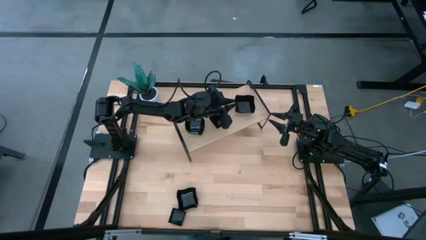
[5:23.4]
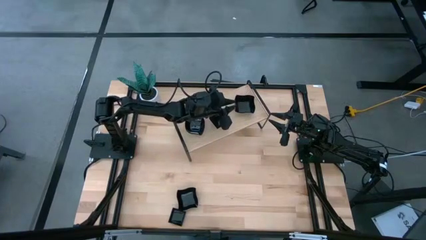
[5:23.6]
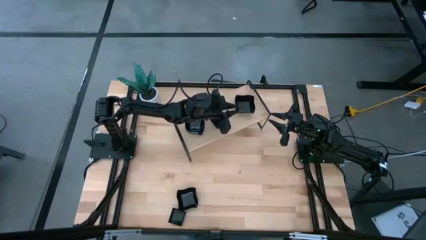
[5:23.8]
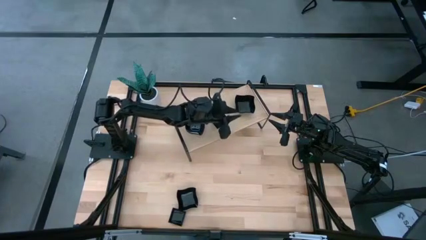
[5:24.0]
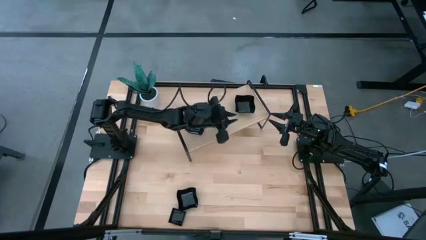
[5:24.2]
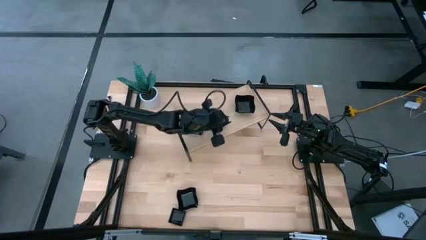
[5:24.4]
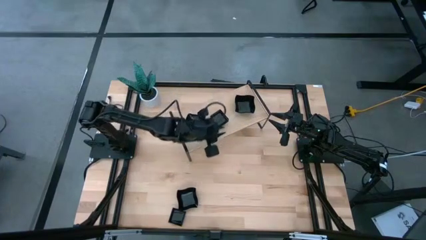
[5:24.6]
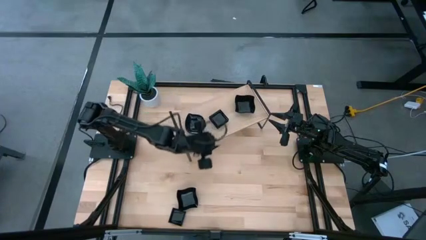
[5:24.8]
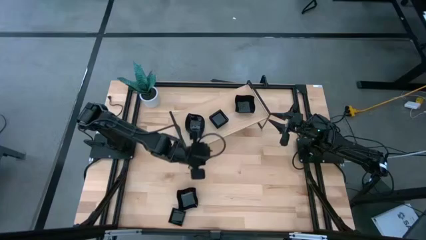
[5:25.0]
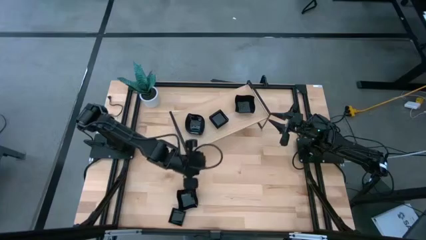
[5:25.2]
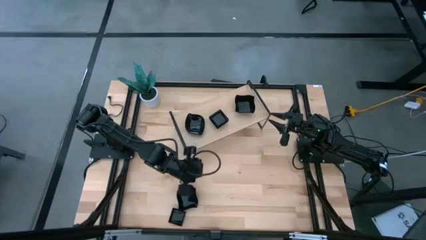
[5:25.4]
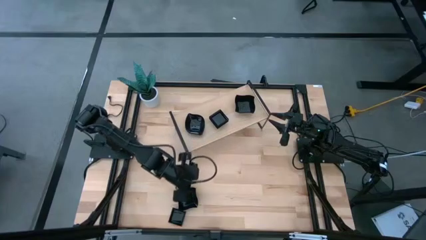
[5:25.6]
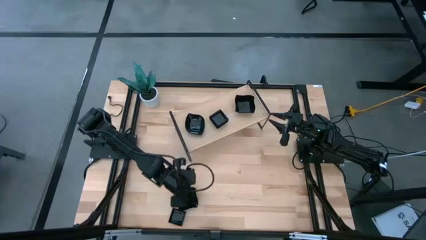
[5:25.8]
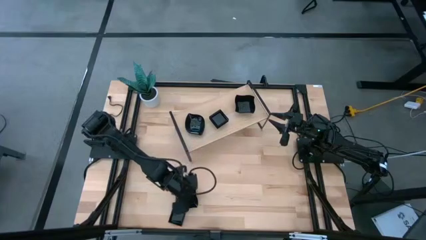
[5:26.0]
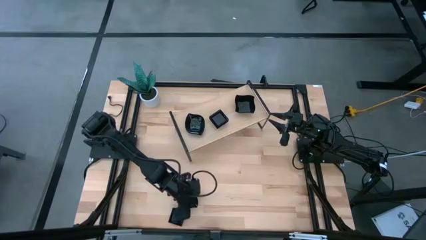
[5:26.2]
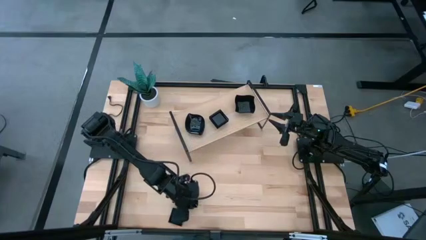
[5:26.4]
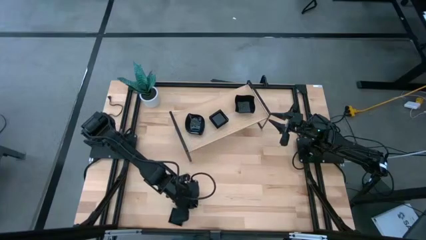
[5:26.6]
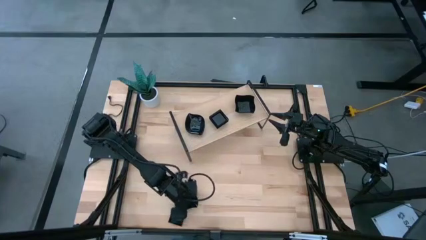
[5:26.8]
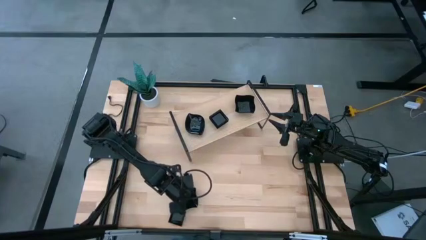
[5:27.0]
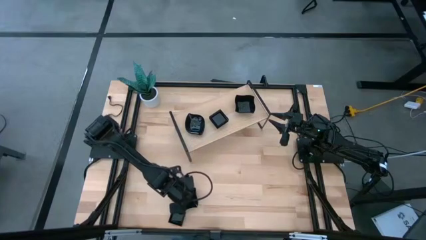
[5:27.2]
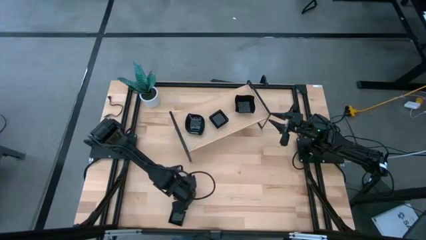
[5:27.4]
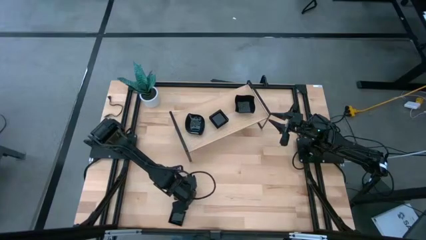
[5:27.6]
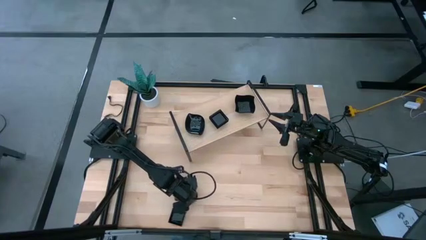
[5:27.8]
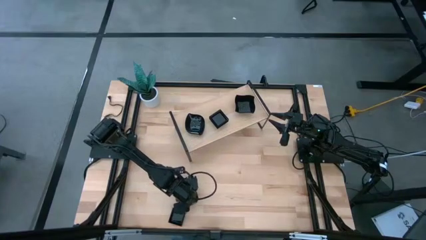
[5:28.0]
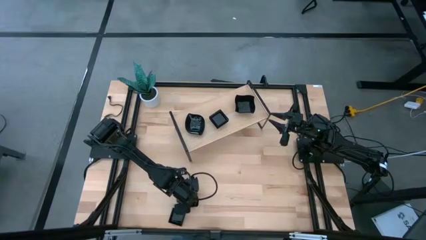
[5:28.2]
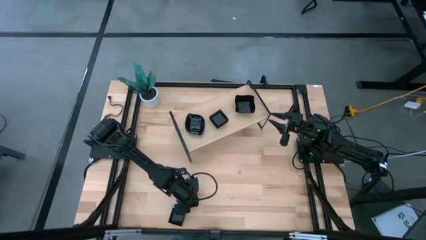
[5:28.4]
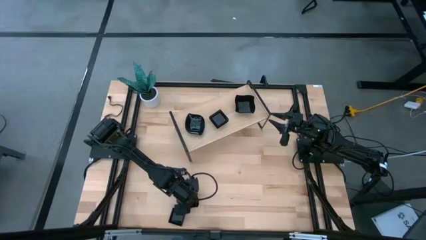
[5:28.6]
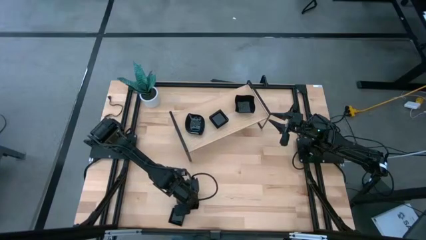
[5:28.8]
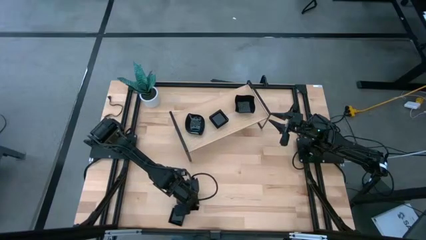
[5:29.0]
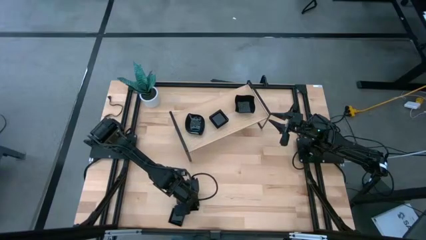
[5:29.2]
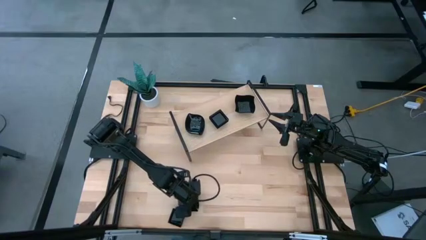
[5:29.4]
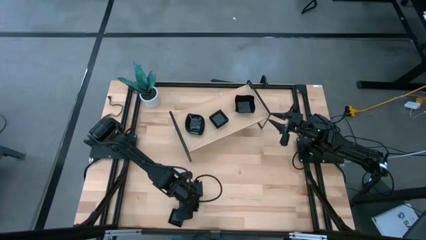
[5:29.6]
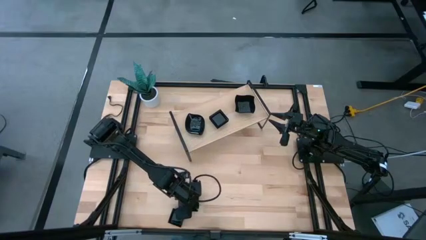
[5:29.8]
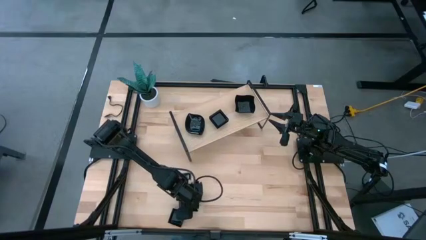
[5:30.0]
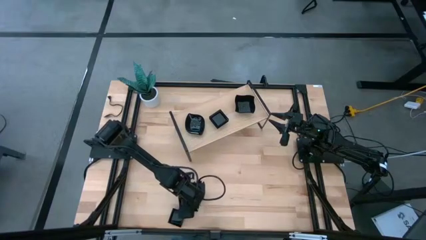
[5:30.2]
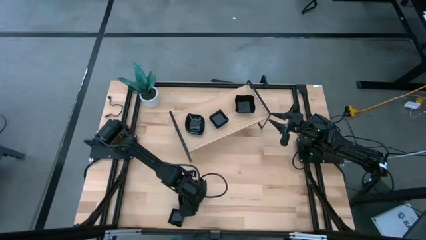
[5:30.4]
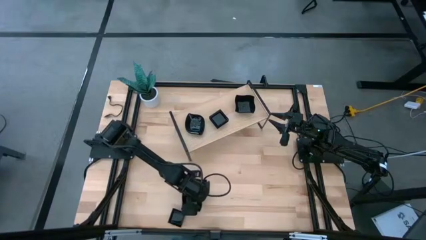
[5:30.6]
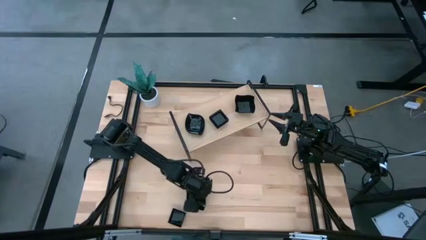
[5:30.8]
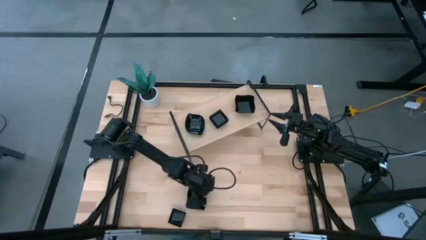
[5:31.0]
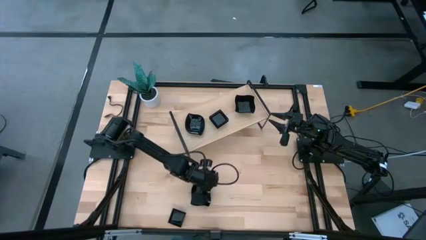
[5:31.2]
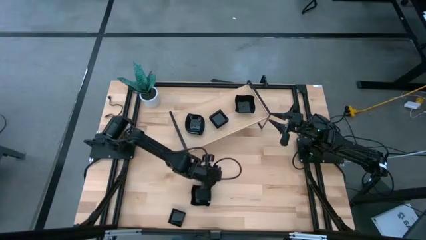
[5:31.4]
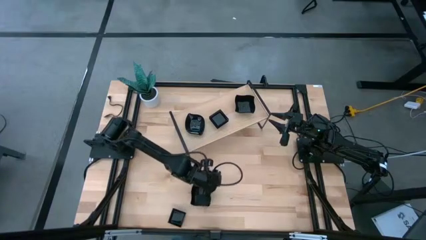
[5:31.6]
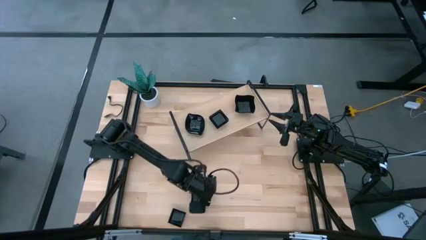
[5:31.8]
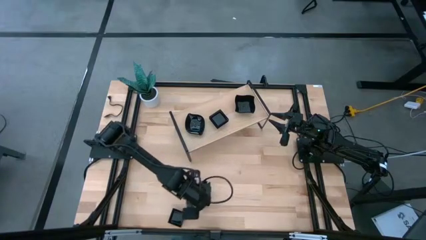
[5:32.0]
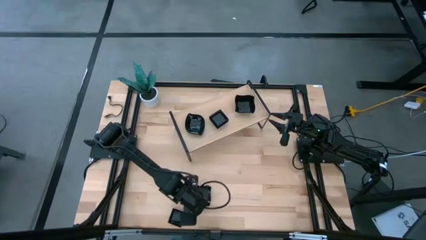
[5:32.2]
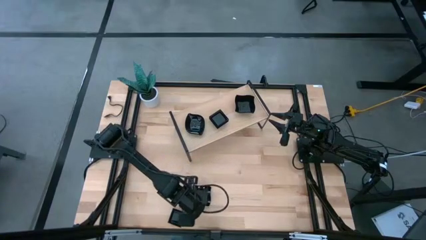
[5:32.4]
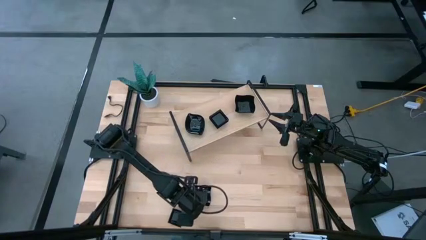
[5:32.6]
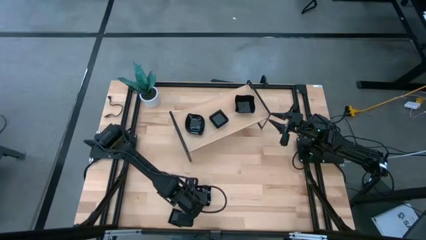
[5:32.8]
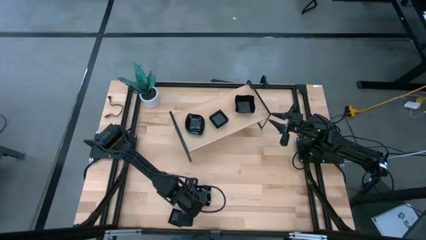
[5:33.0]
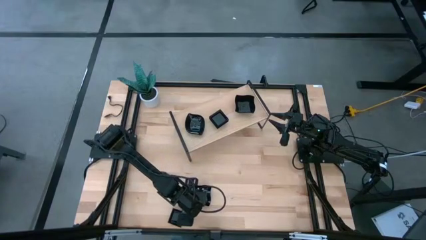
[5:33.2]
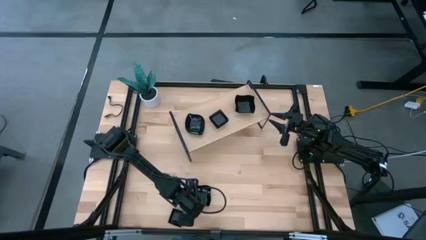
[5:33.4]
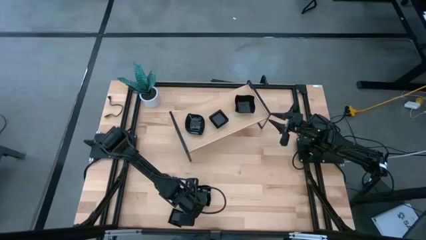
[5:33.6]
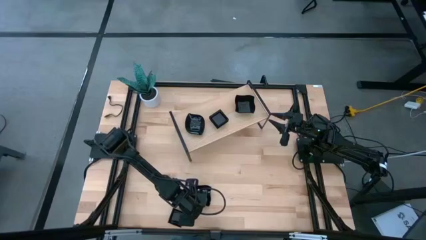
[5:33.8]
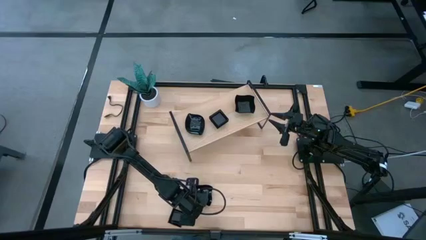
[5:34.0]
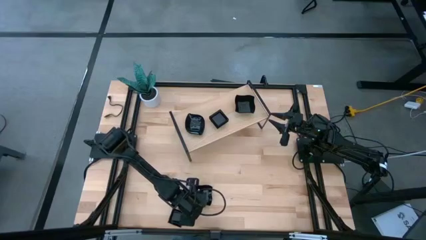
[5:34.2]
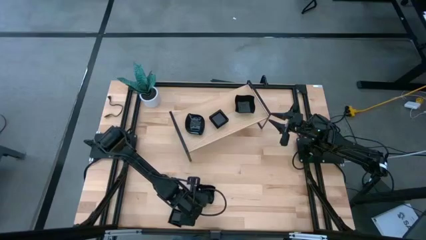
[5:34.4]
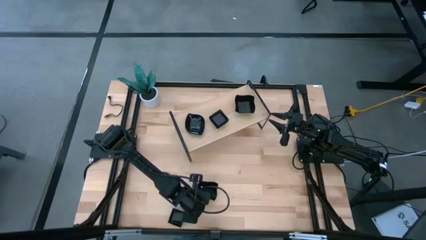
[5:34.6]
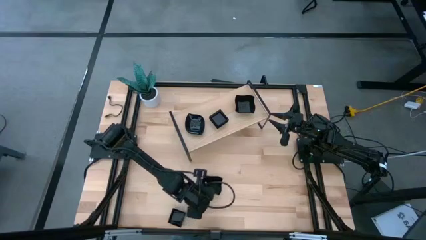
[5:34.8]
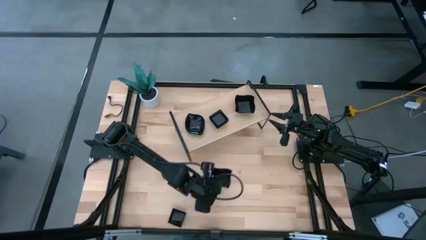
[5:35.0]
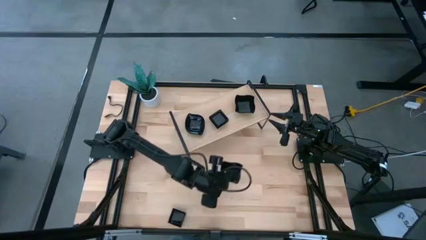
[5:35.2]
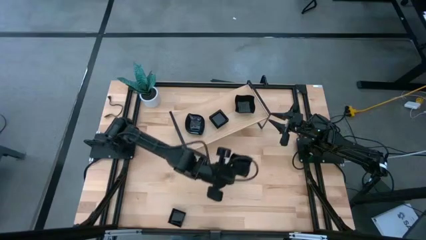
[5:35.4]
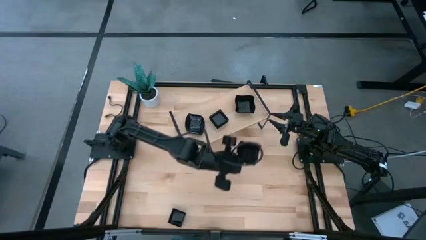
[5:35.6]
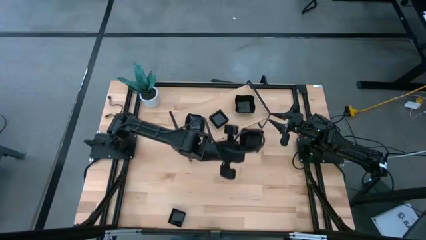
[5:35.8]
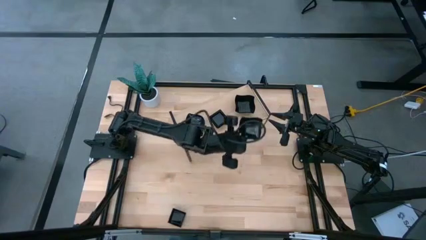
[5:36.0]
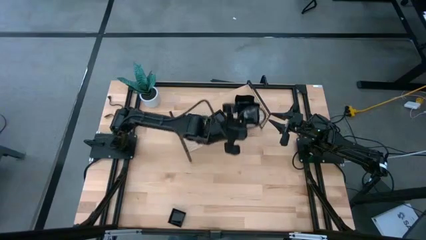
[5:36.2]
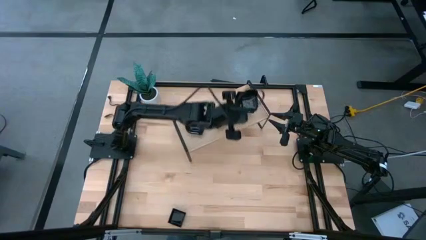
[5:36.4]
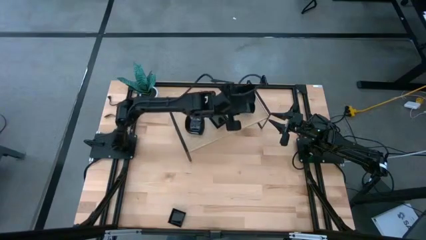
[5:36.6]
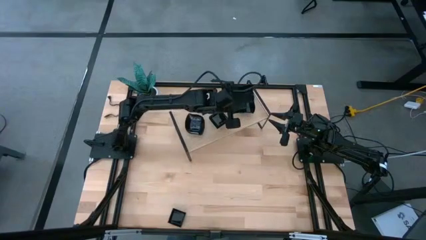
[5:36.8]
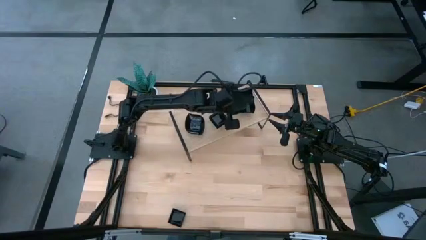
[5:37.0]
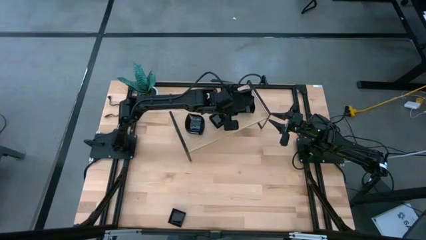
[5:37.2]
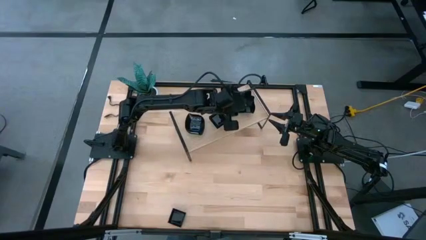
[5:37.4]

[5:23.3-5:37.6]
Task: Pick & Place Mini shaped plates
Stack the black distorted square plate on top of the black distorted square plate on the shelf

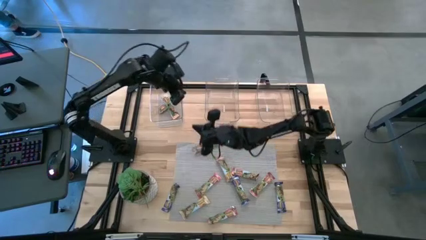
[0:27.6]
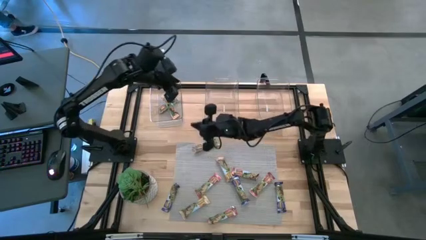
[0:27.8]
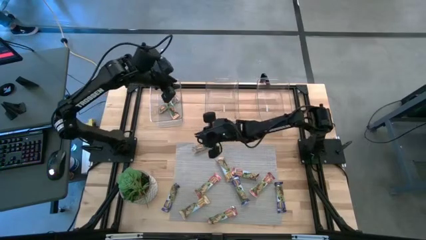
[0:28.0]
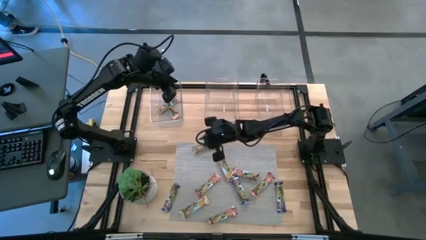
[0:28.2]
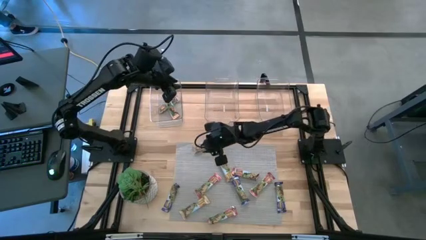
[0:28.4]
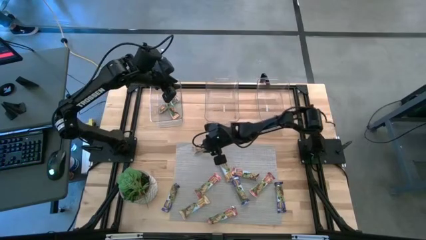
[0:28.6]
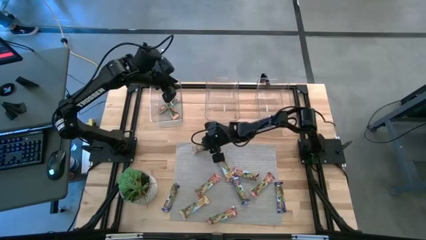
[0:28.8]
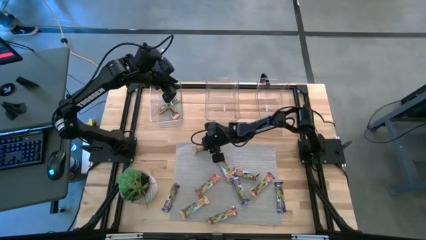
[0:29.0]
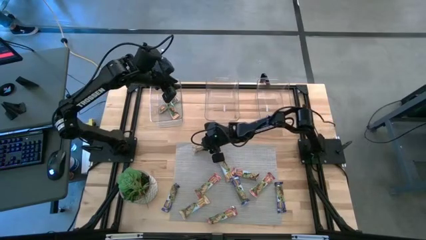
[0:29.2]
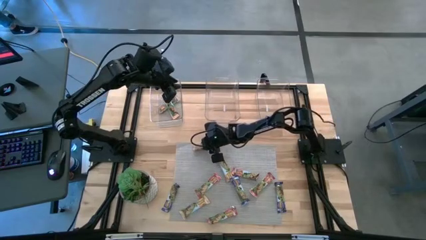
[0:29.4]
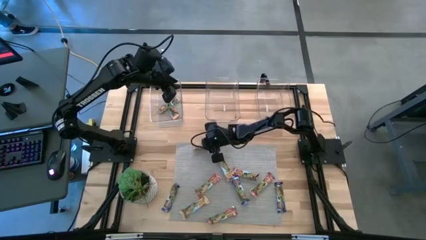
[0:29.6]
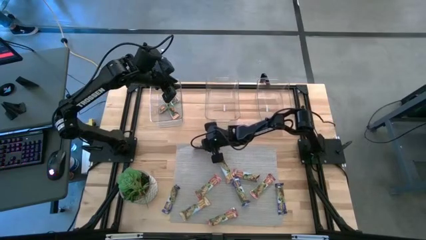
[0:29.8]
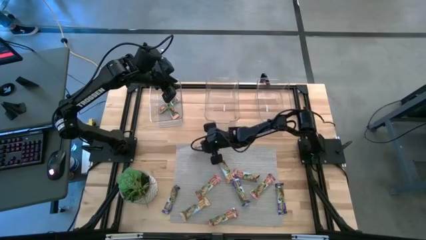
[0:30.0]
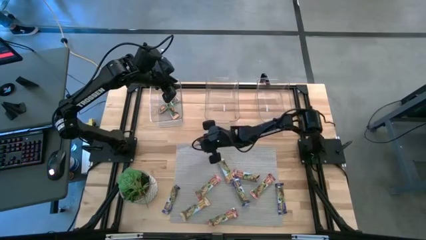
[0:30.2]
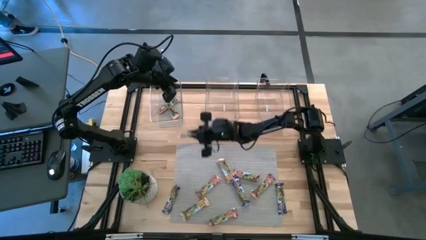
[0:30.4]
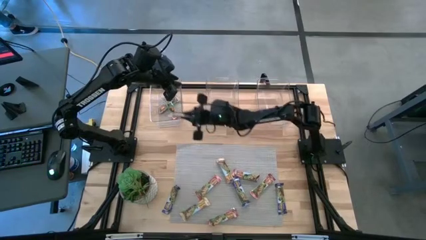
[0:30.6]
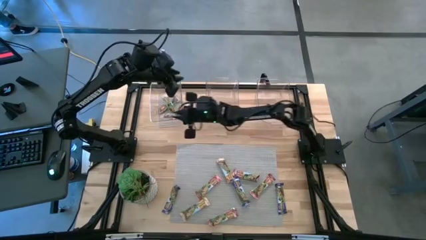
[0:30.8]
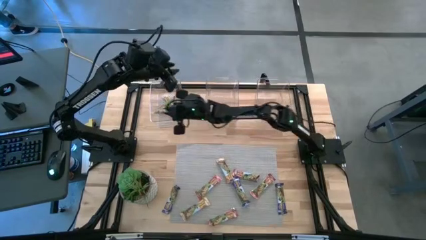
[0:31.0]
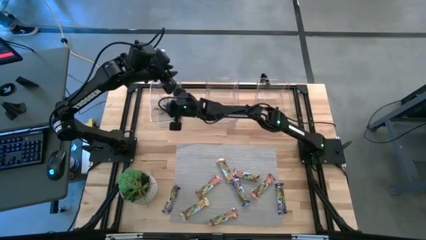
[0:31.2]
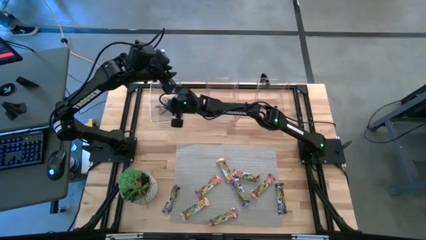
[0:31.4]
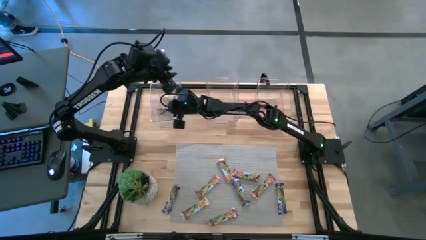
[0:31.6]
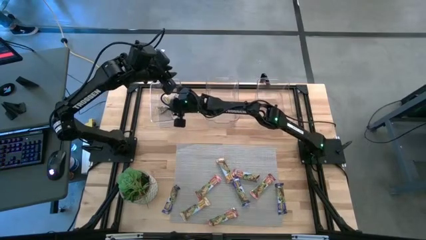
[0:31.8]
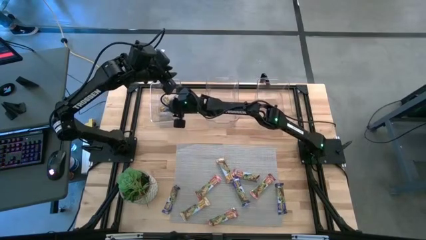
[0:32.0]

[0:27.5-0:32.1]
Task: Pick and place Granola Bars by type
Put the yellow granola bar into the top left transparent bin
